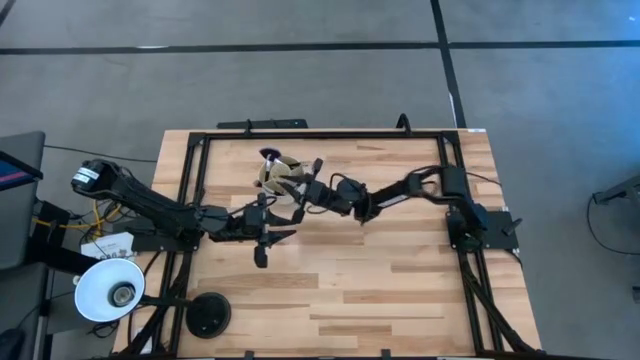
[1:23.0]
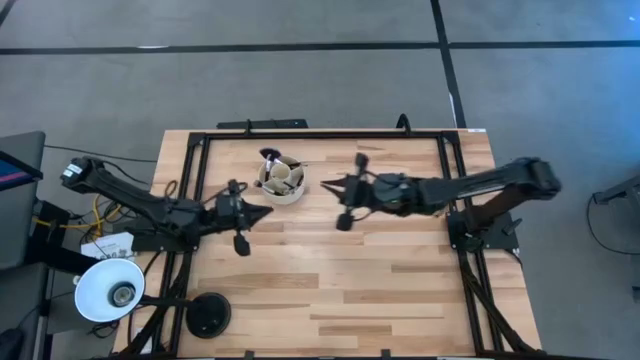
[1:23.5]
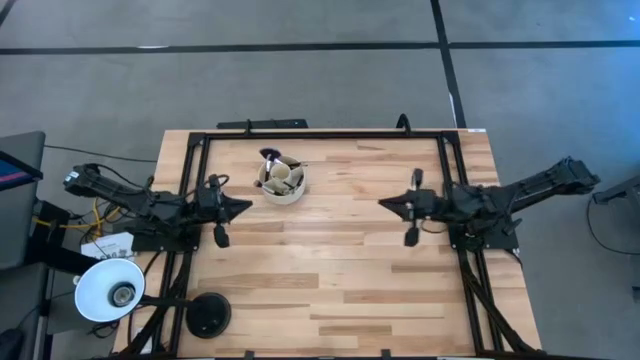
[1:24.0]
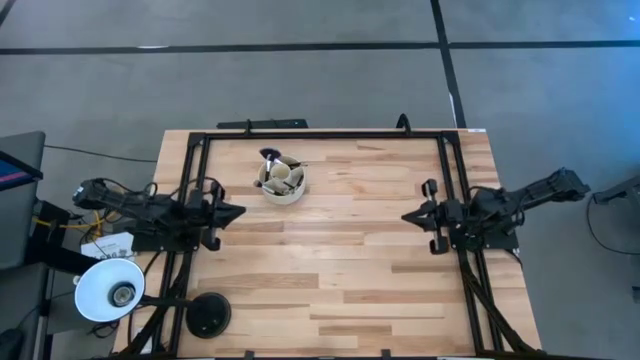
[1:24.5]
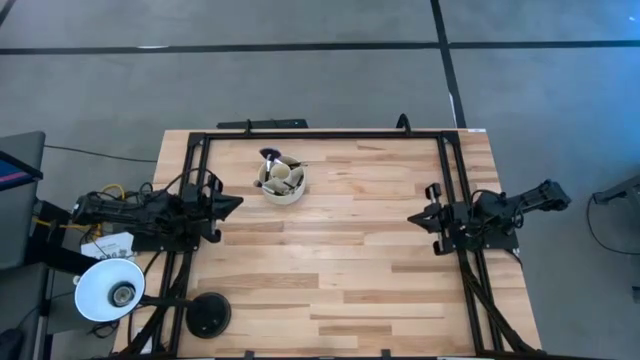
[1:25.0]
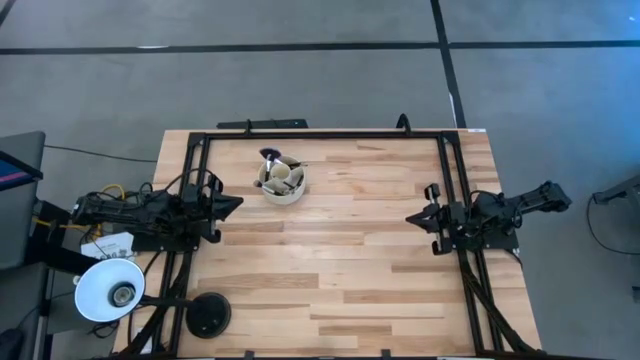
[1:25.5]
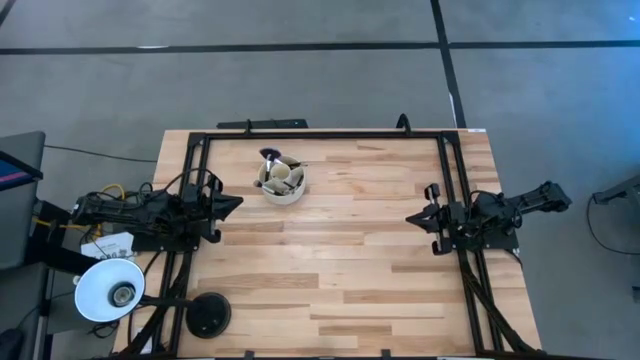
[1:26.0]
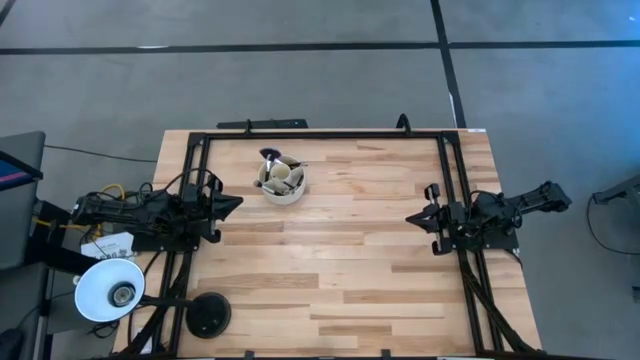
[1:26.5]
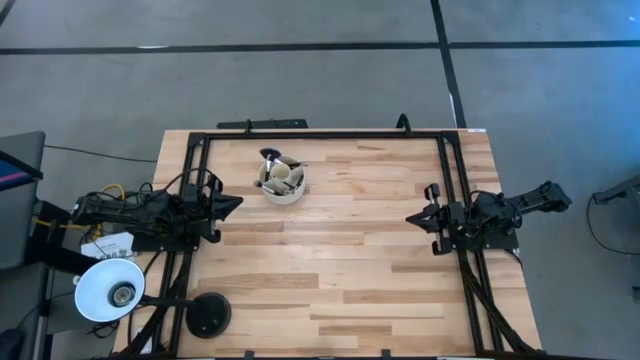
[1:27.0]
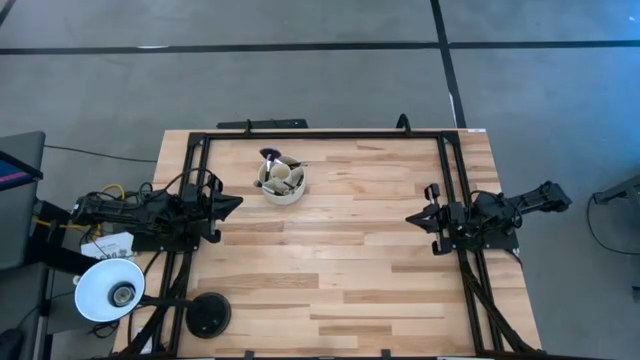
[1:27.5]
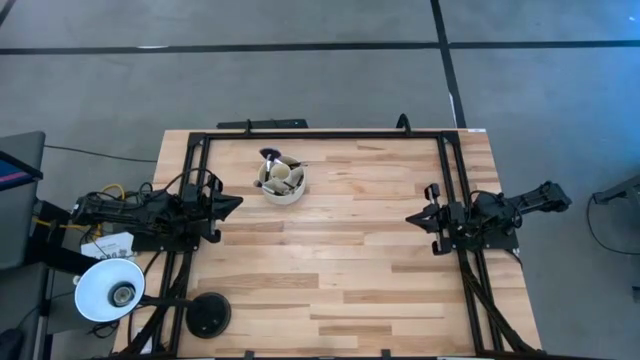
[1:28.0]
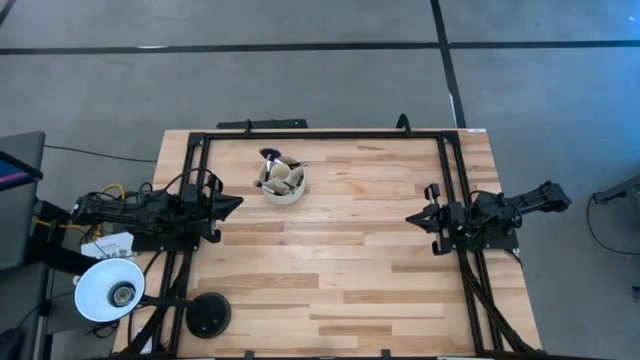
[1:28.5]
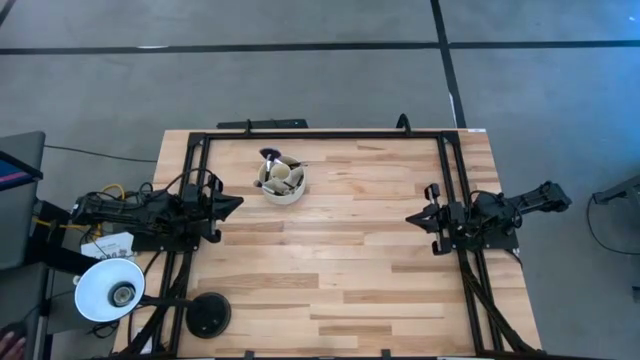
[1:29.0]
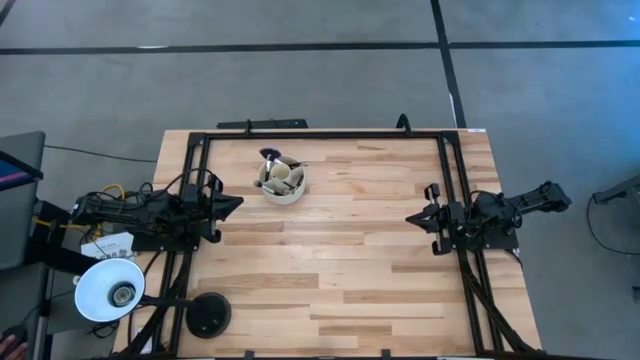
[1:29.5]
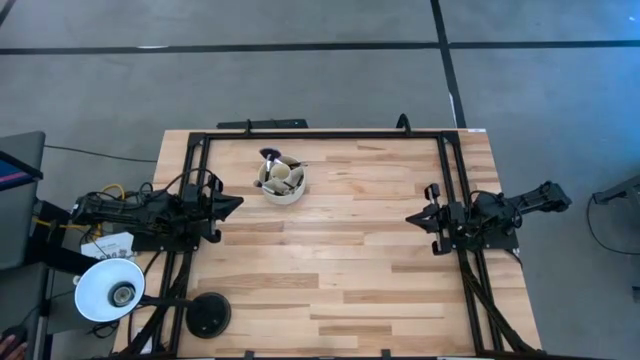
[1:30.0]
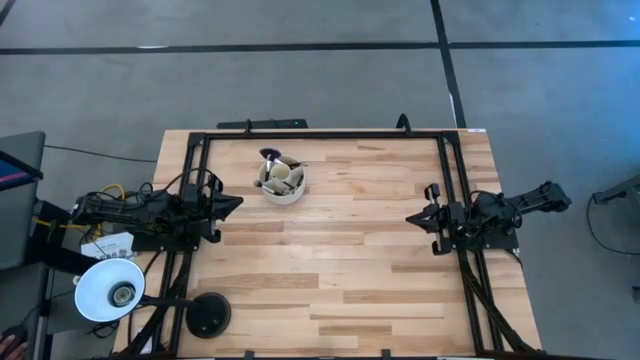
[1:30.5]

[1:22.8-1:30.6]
Task: Sort items
Return to Home Position

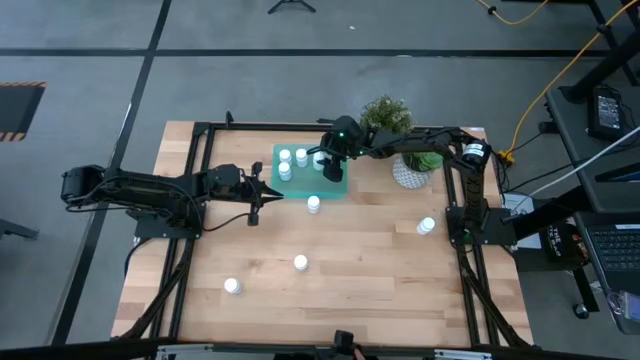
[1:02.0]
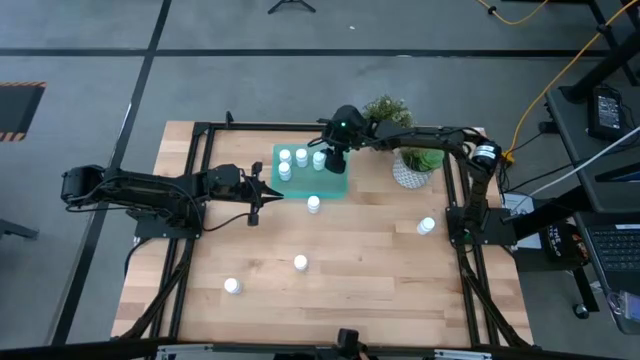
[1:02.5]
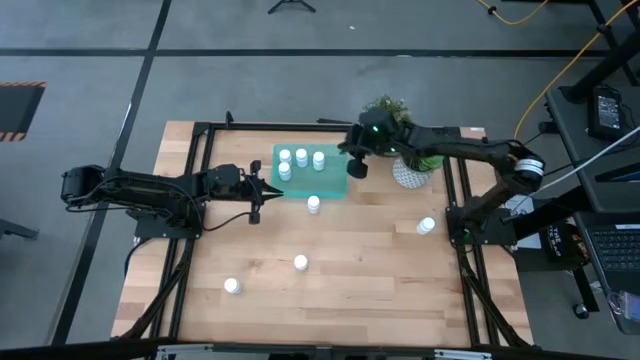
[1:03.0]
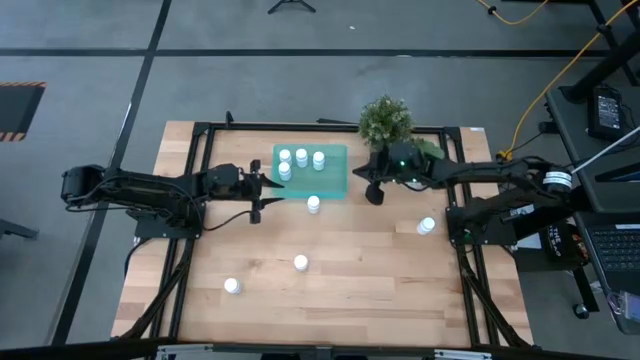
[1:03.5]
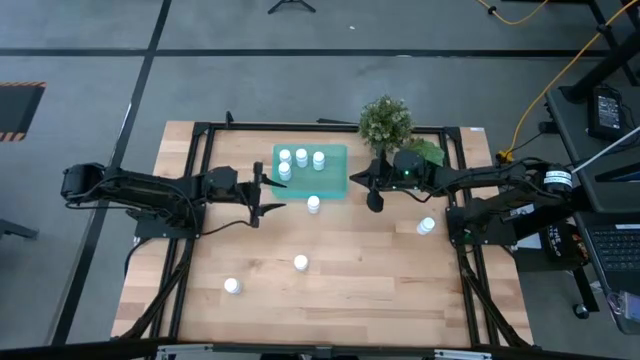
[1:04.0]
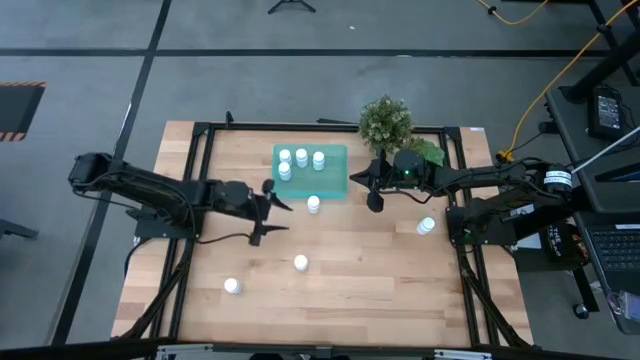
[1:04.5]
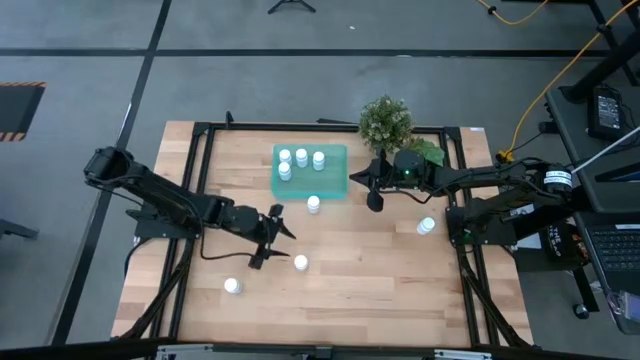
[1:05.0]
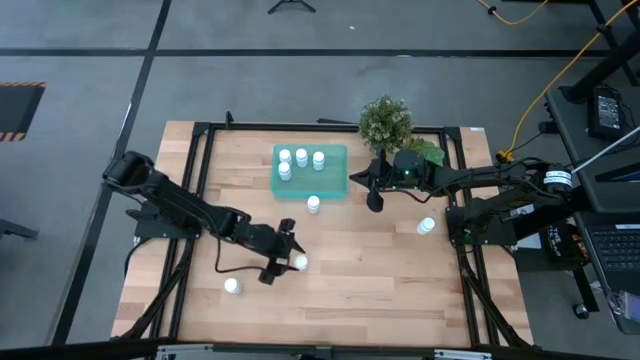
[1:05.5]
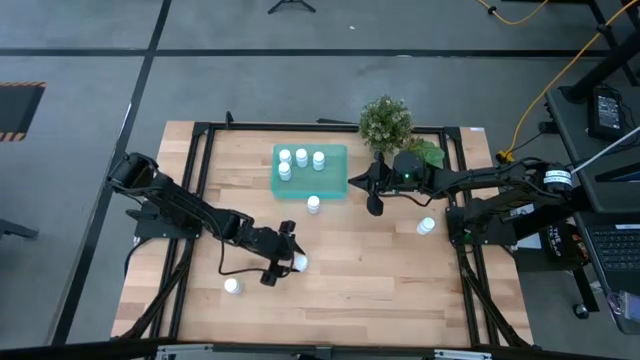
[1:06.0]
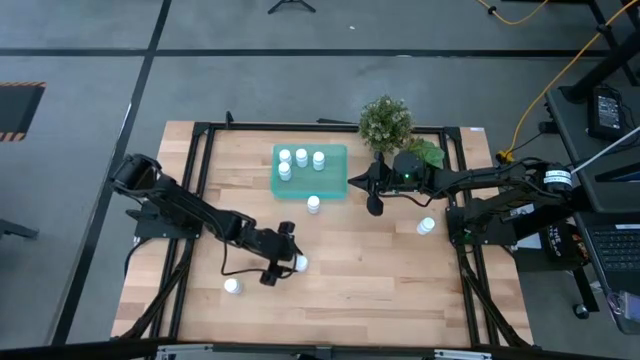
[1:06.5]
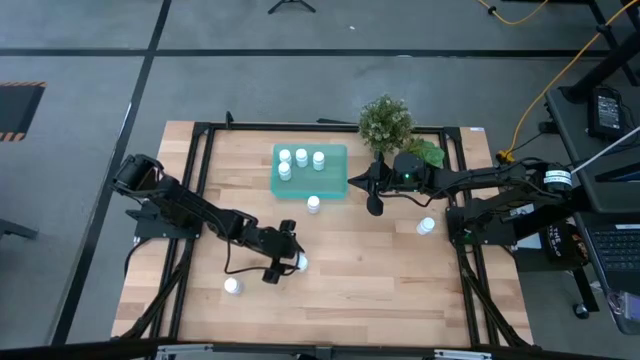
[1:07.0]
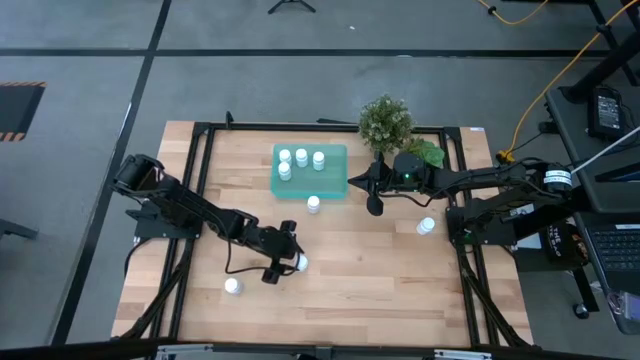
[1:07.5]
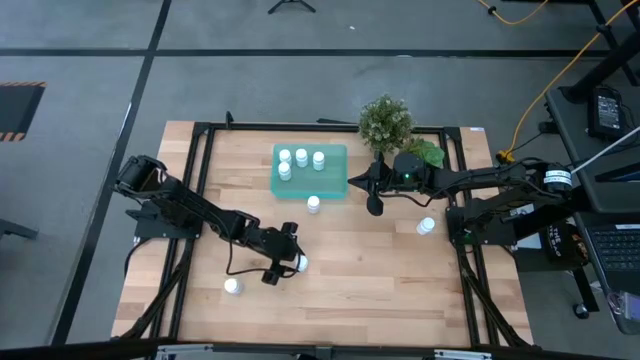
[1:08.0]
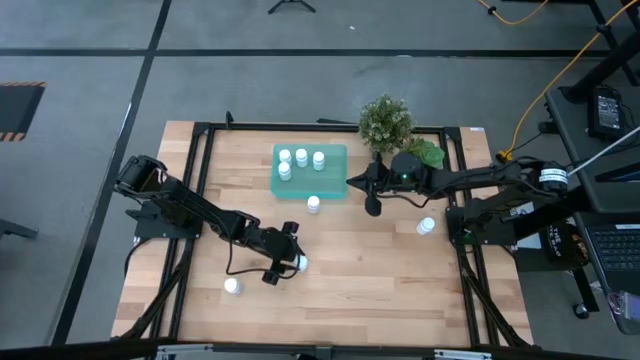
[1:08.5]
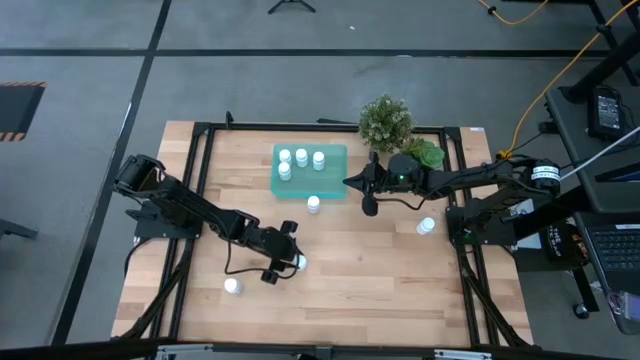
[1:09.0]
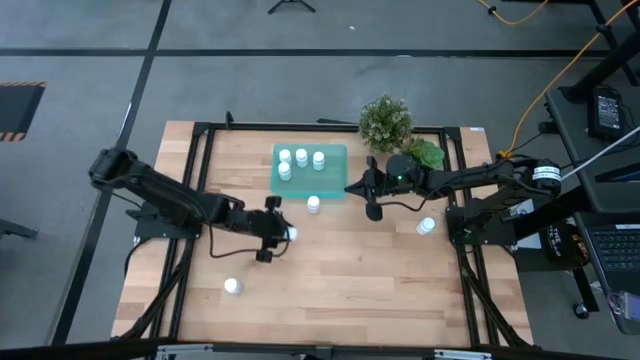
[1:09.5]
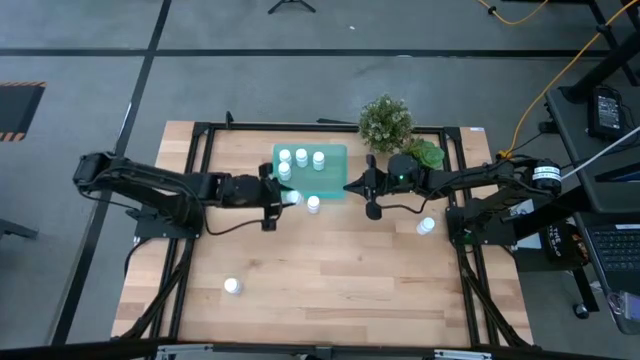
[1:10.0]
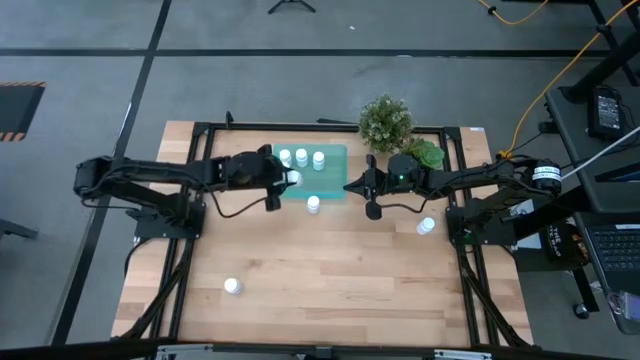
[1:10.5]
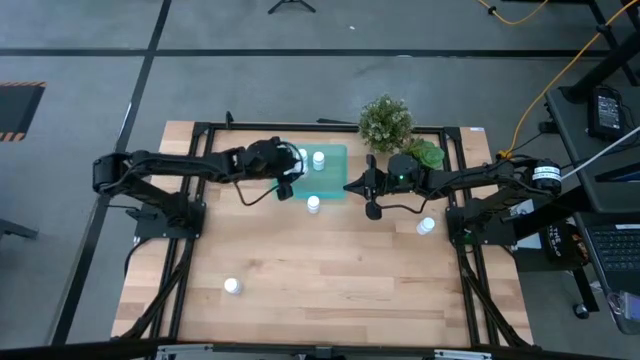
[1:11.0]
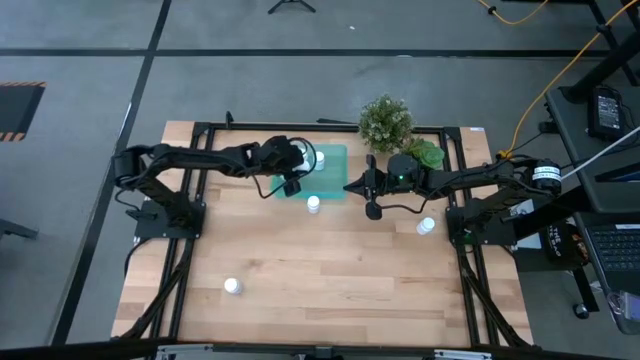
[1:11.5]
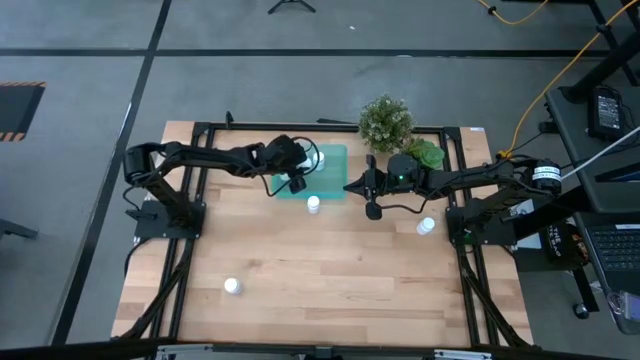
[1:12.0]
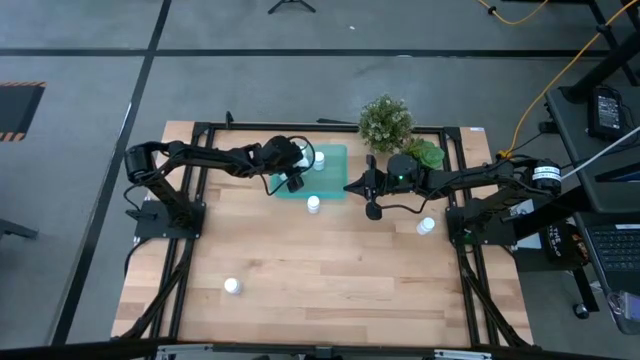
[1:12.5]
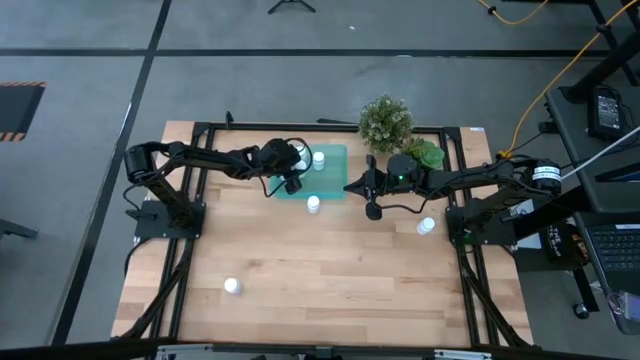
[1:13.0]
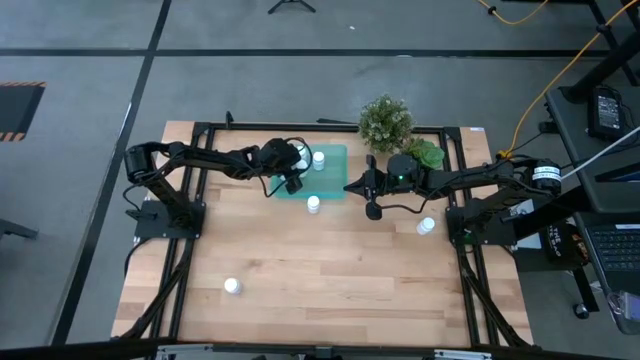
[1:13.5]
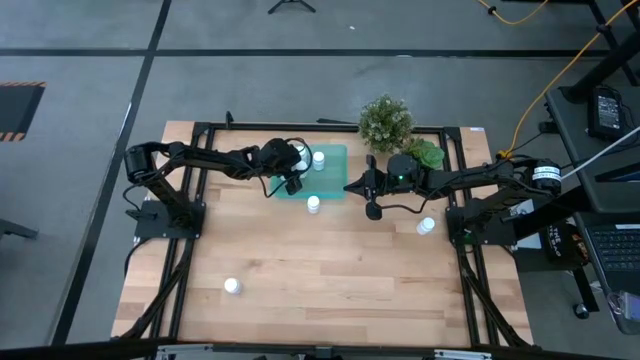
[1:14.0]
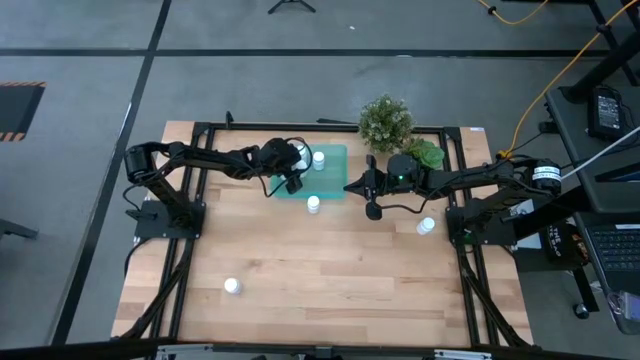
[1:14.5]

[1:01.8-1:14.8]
Task: Pick and place pill bottles into a basket
Put the white pill bottle into the green bin
